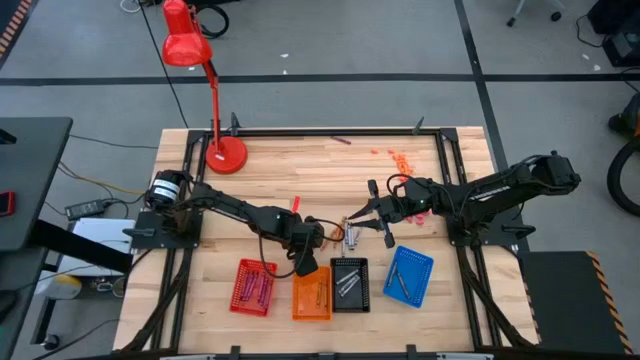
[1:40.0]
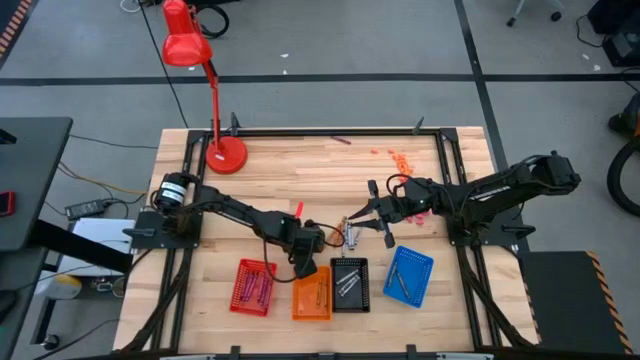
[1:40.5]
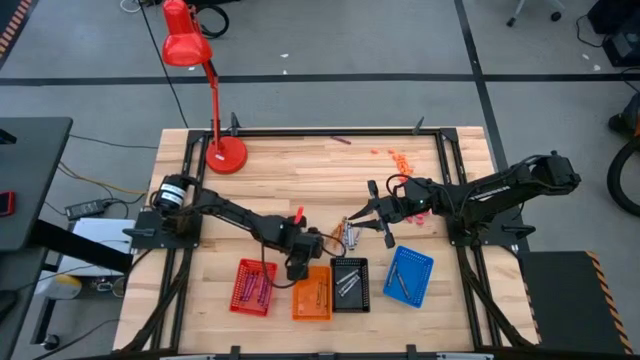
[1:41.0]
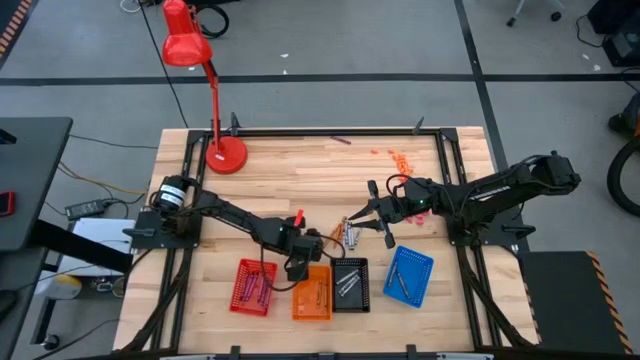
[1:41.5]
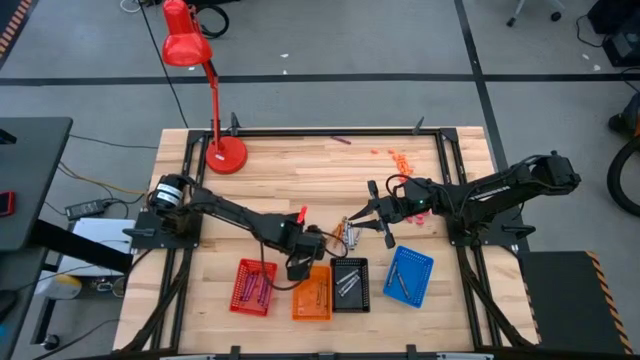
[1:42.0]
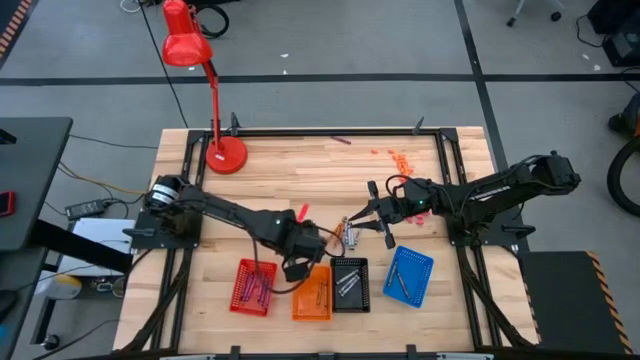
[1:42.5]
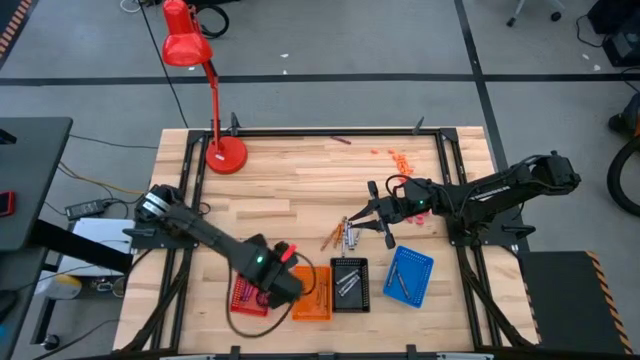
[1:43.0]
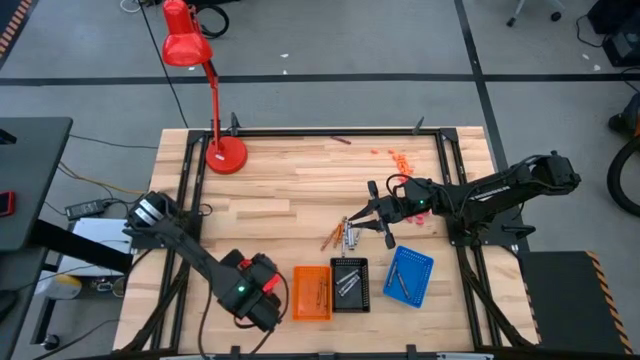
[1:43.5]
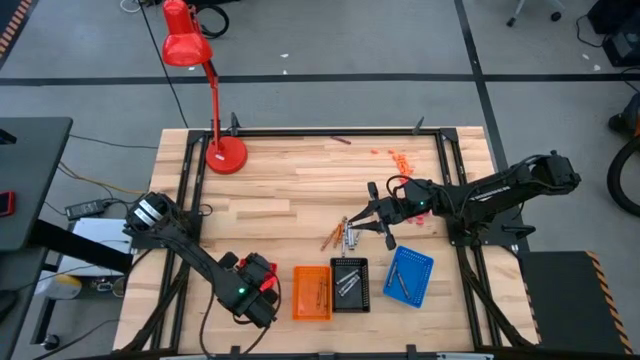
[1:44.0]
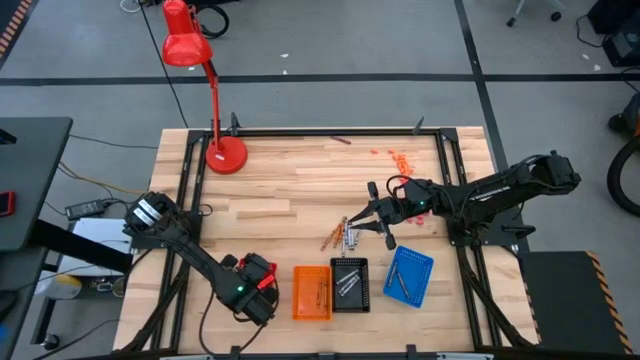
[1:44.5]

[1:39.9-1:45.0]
Task: Sort crayons
Put the violet crayon into the red bin

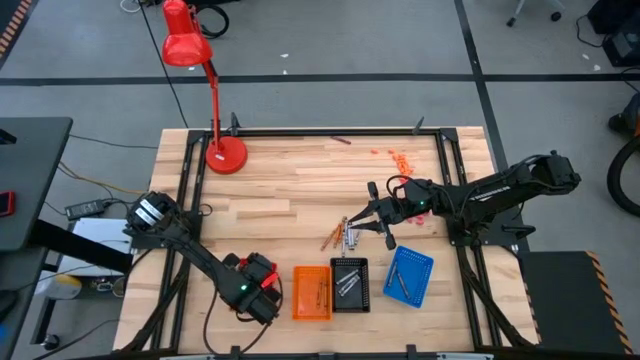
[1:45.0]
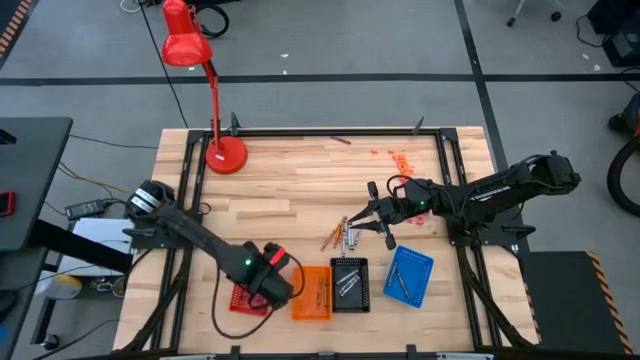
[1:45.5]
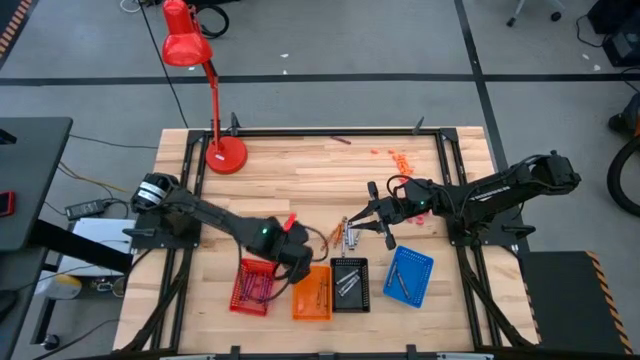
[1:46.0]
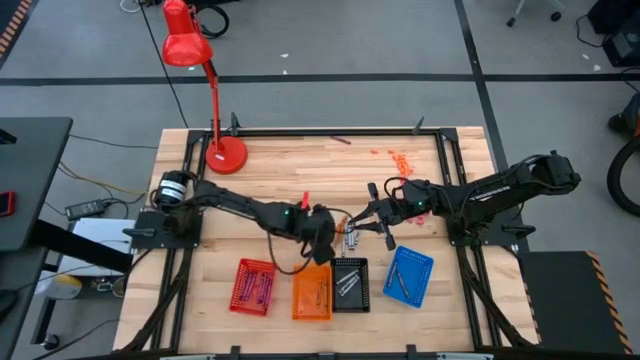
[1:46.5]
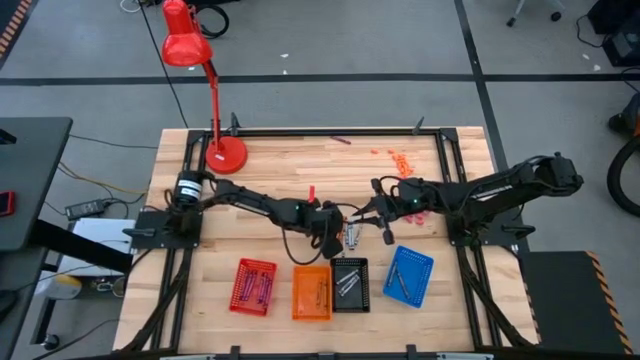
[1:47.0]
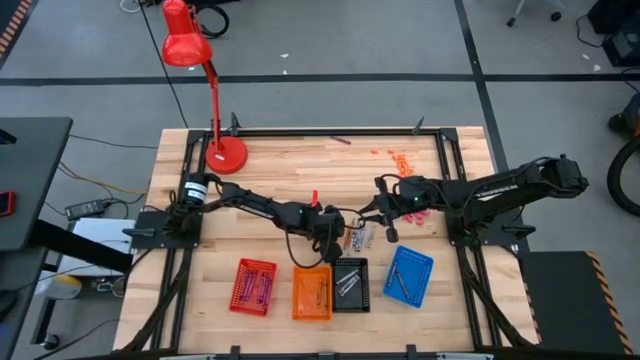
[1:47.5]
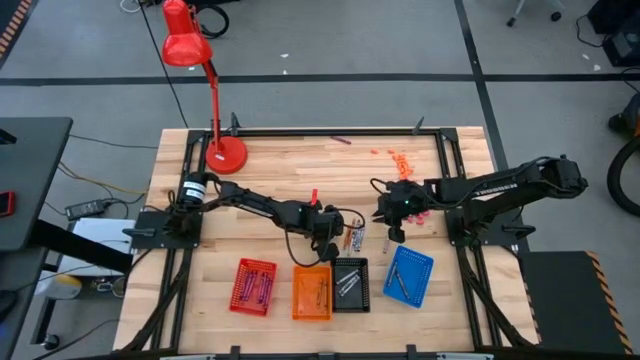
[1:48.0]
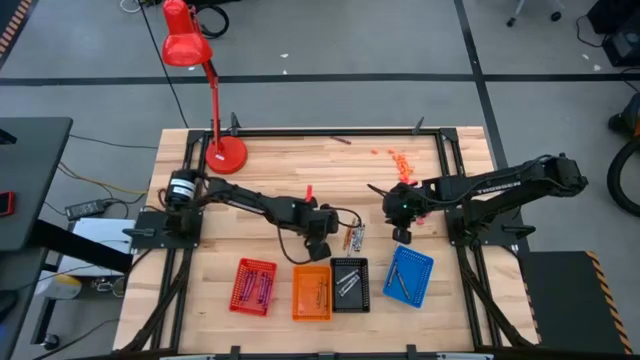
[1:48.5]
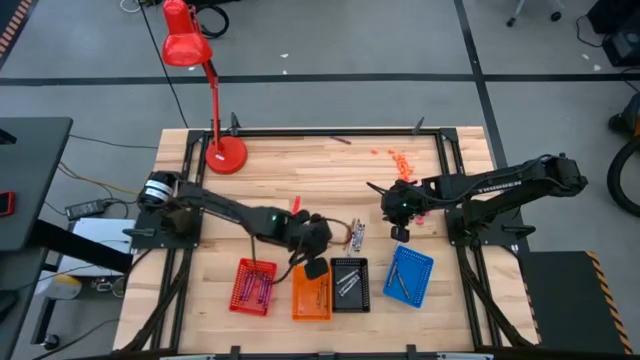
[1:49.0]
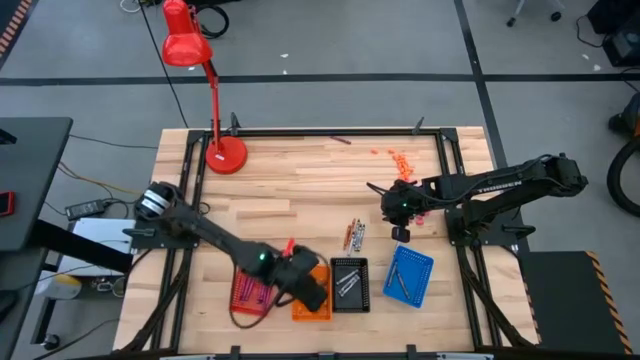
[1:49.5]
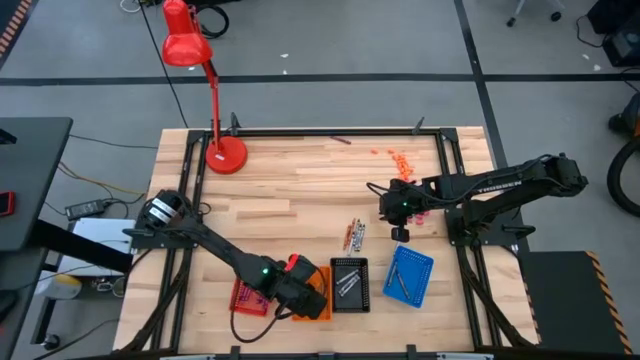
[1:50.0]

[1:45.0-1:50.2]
Put the orange crayon into the orange bin

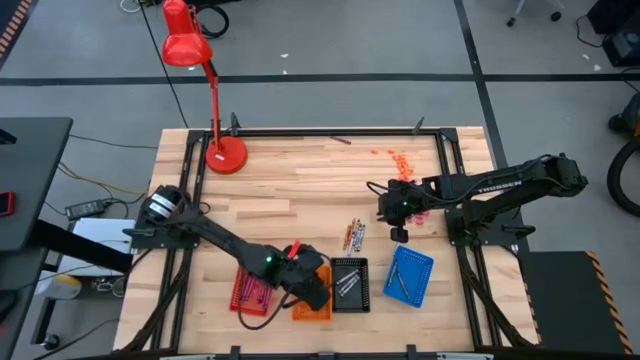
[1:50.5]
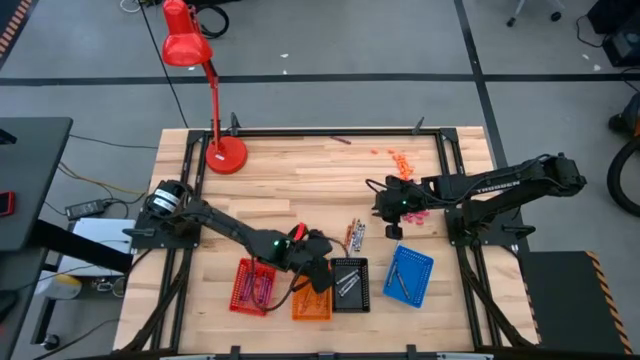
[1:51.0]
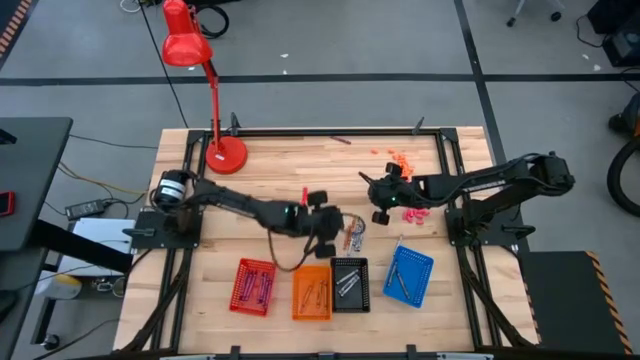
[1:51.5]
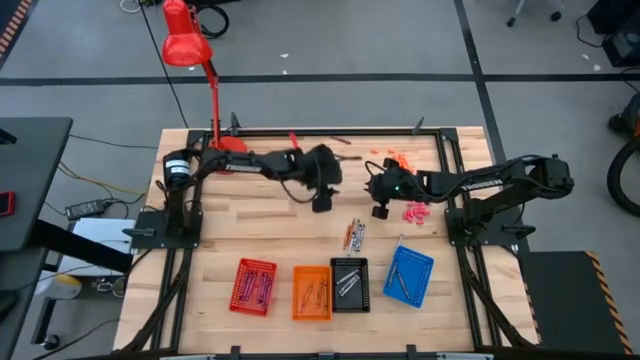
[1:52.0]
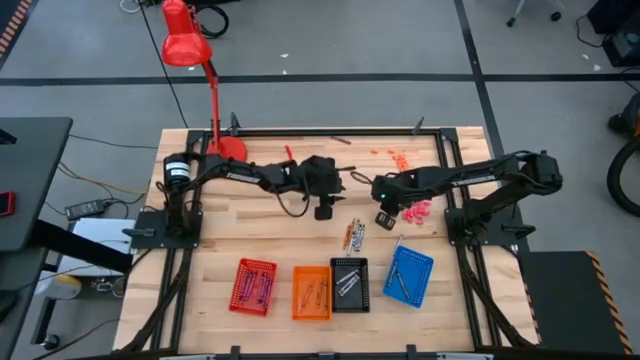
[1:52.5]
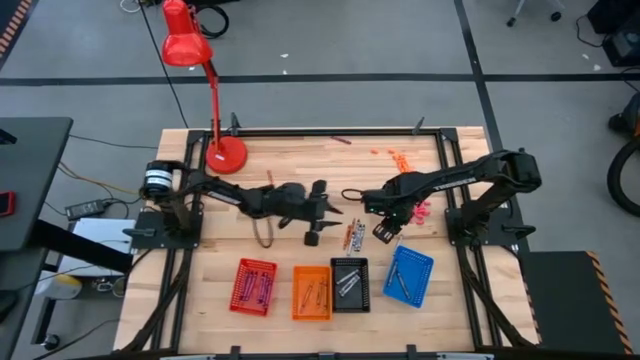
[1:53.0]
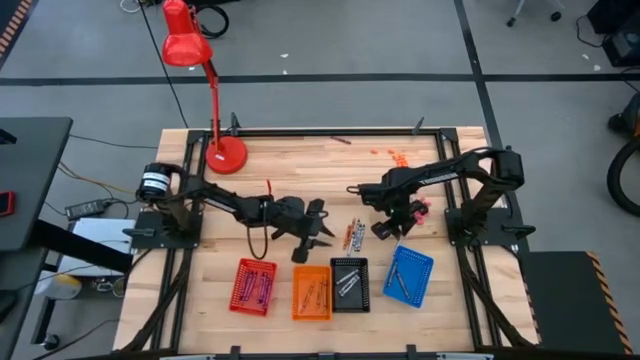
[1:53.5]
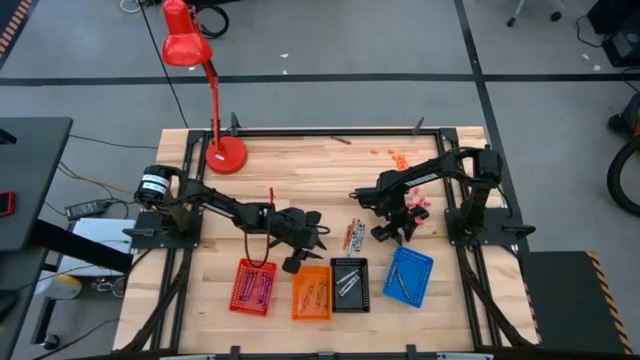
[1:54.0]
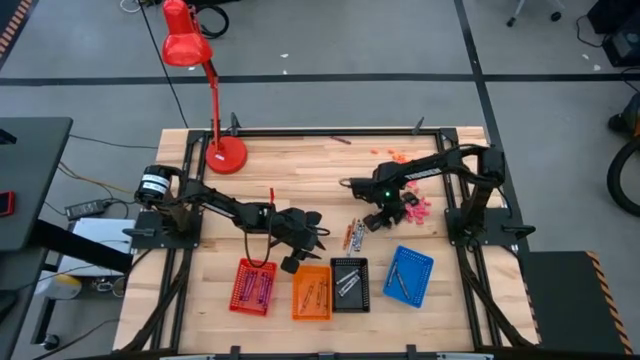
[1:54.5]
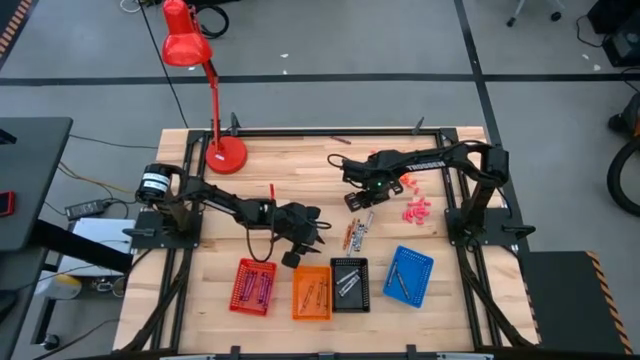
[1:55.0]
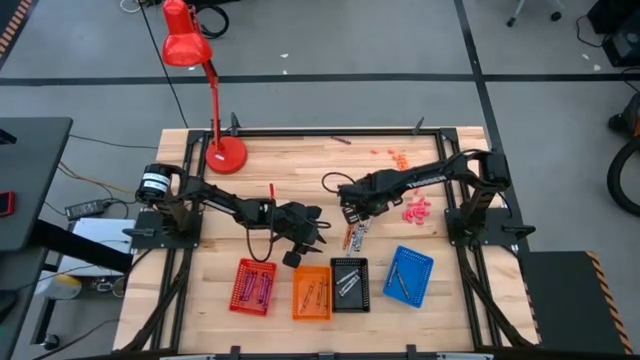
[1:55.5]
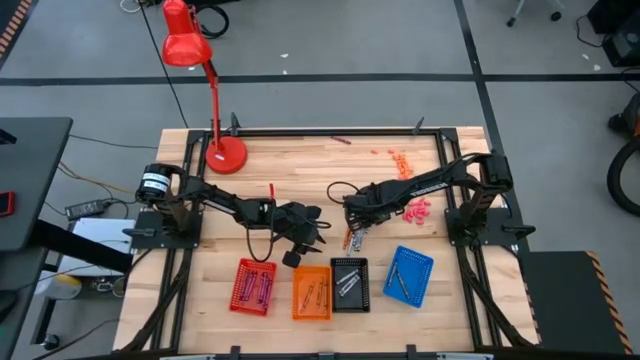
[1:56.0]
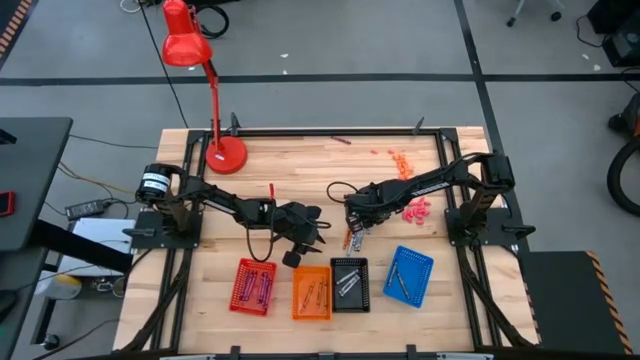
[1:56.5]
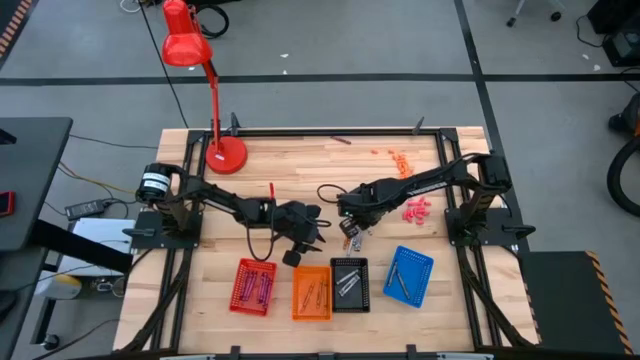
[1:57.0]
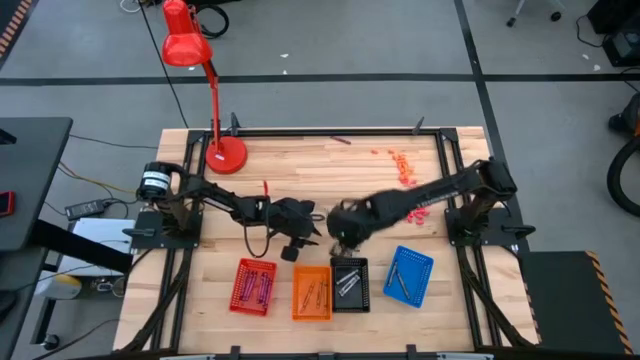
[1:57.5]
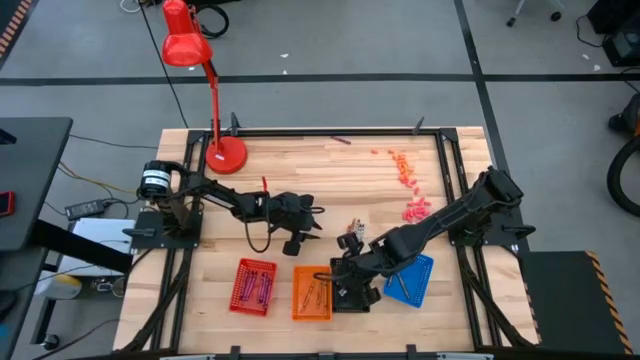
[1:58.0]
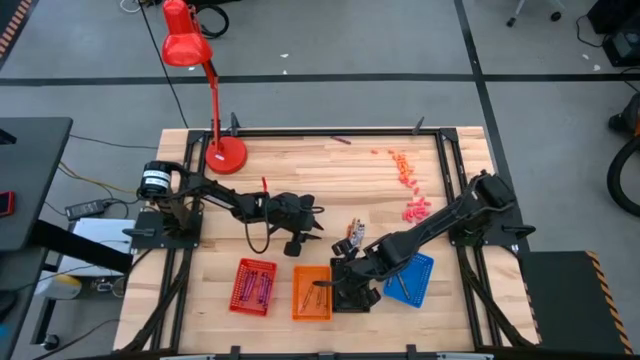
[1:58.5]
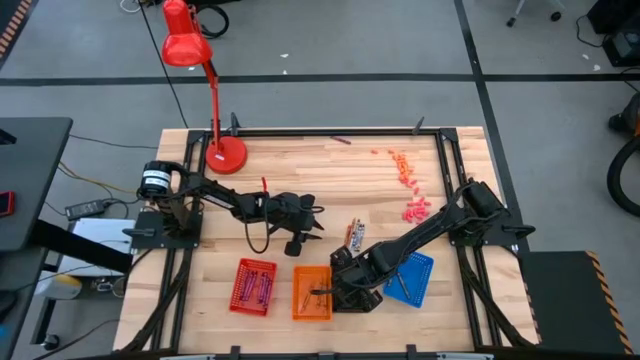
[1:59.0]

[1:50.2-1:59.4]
Put the black crayon into the black bin

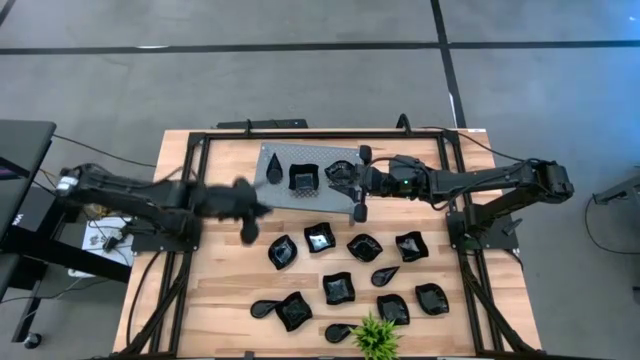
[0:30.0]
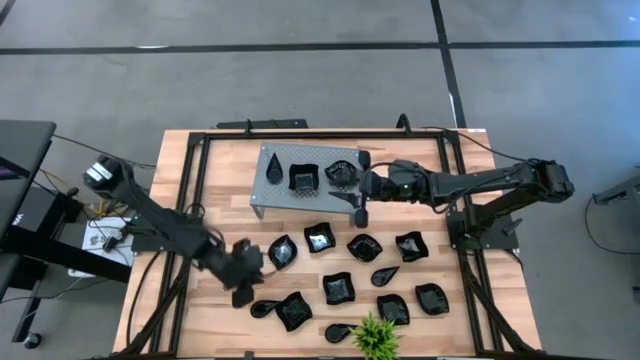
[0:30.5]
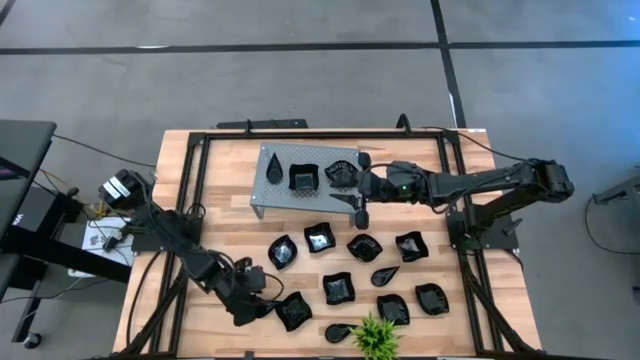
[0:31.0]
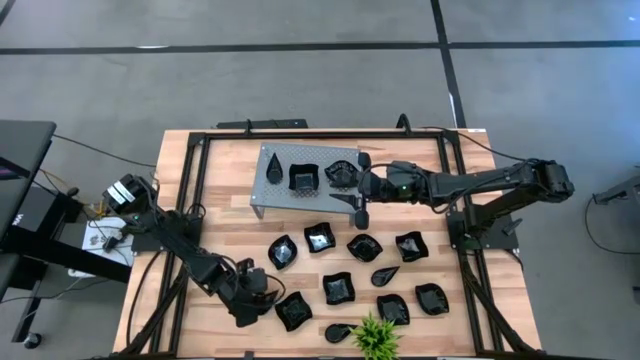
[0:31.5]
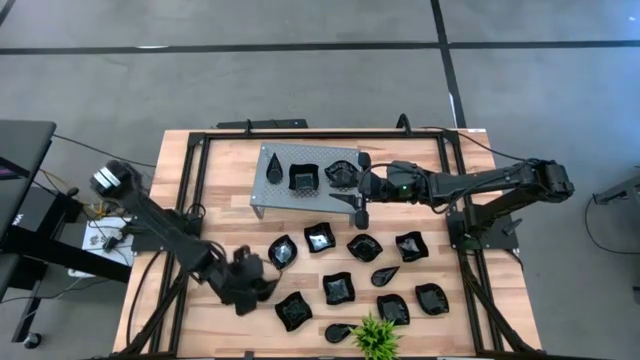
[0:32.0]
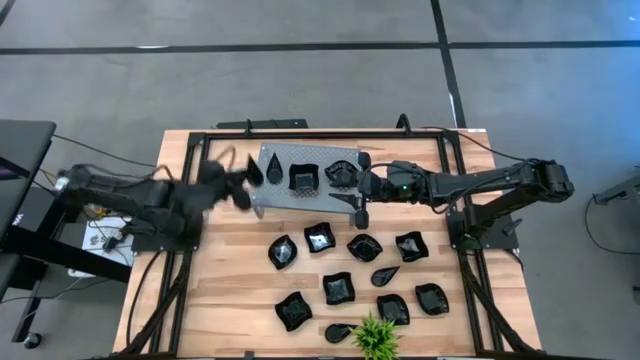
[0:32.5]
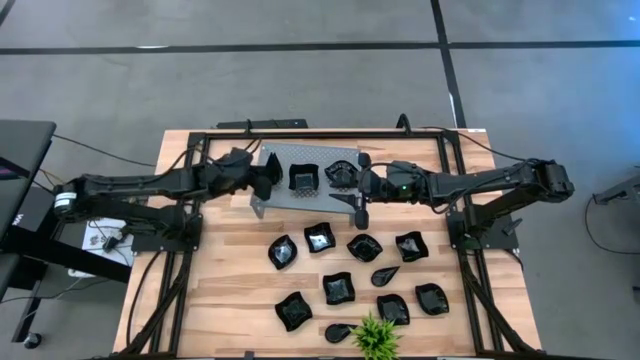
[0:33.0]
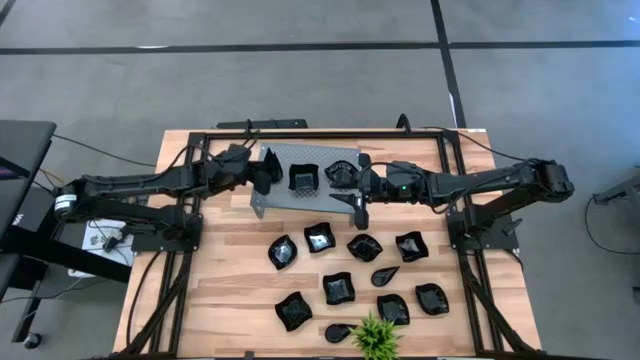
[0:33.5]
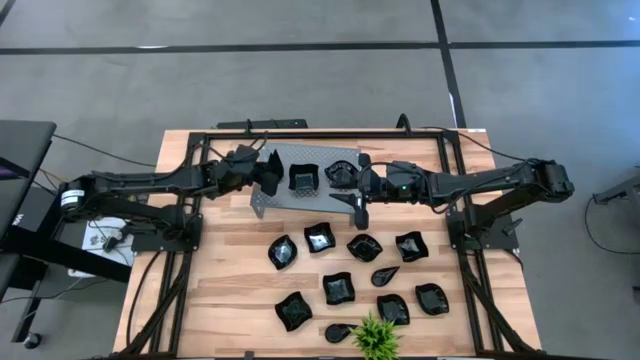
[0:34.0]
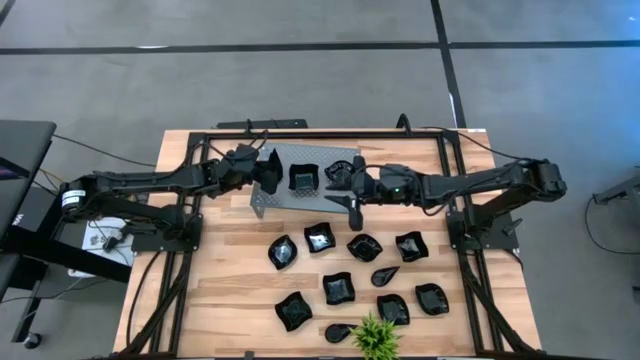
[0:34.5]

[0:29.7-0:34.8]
Task: Pick & Place Mini shaped plates
Stack the black drop-shaped plate on top of the black drop-shaped plate on the shelf
